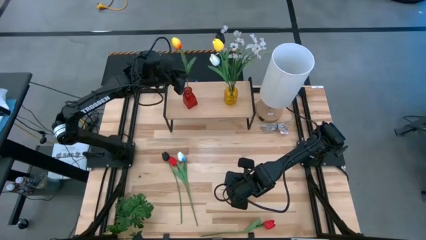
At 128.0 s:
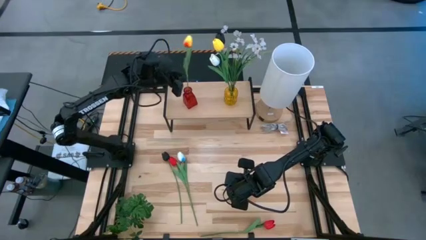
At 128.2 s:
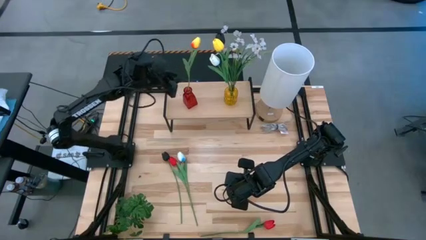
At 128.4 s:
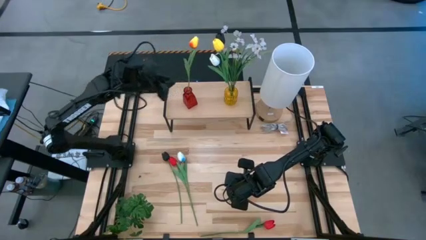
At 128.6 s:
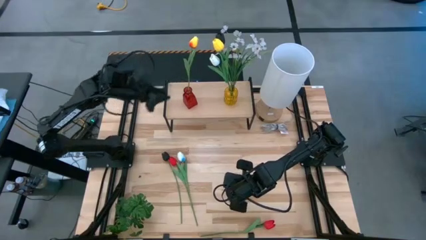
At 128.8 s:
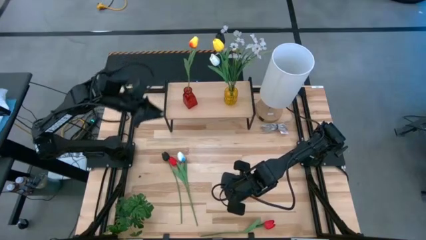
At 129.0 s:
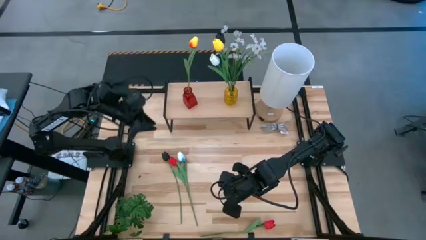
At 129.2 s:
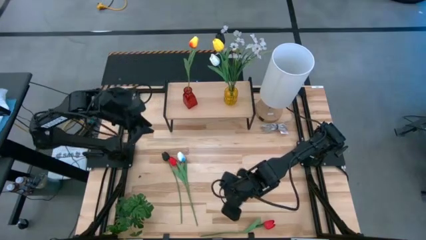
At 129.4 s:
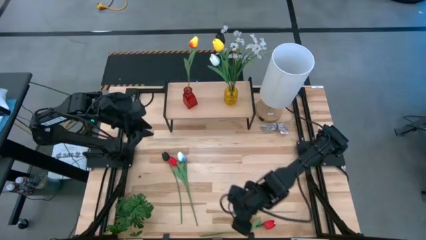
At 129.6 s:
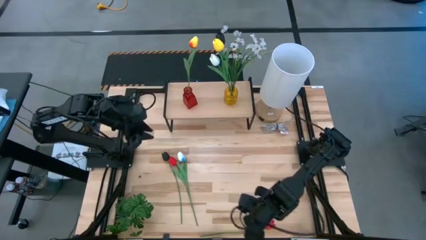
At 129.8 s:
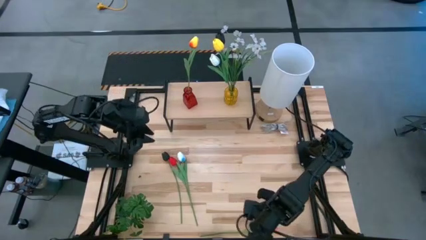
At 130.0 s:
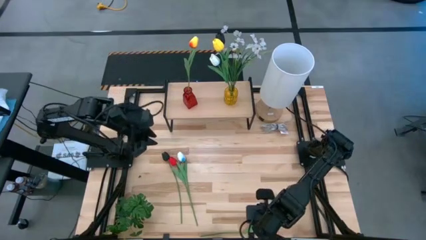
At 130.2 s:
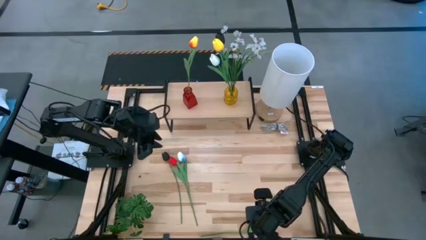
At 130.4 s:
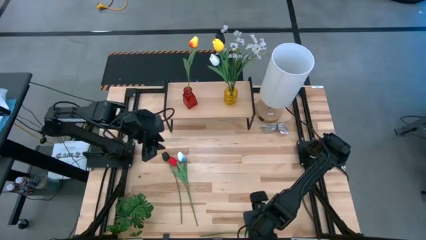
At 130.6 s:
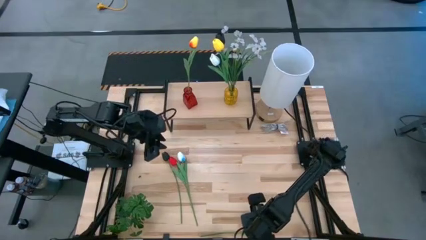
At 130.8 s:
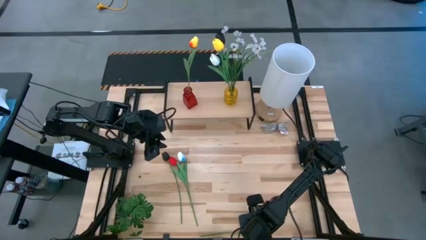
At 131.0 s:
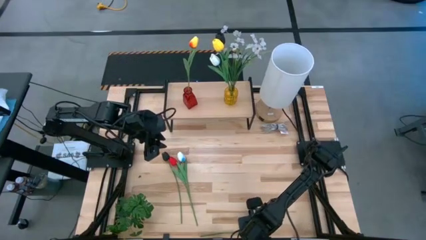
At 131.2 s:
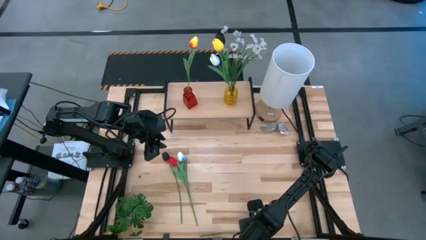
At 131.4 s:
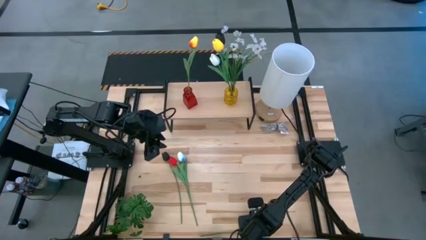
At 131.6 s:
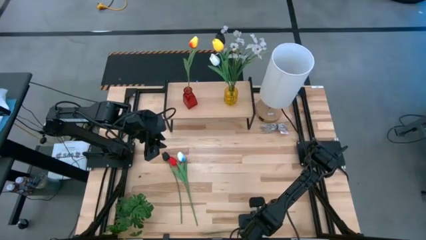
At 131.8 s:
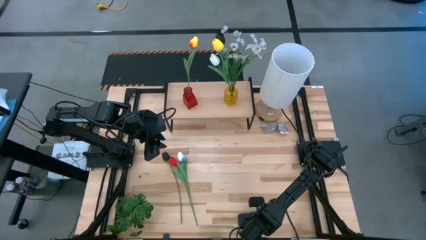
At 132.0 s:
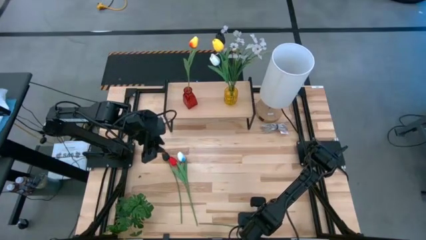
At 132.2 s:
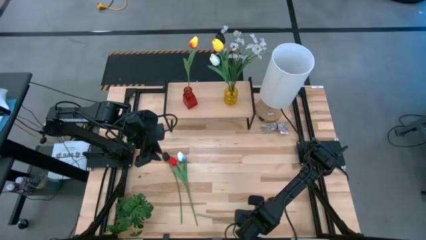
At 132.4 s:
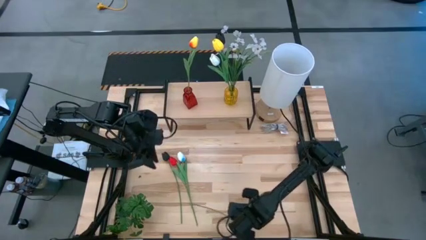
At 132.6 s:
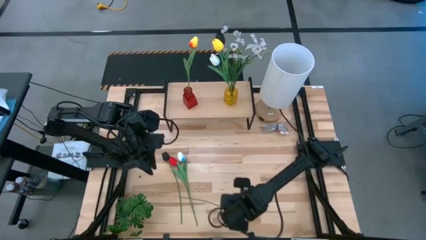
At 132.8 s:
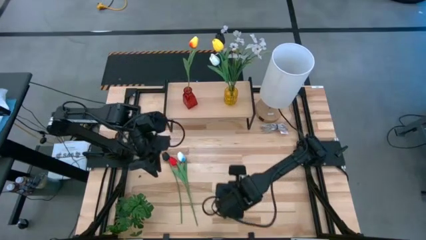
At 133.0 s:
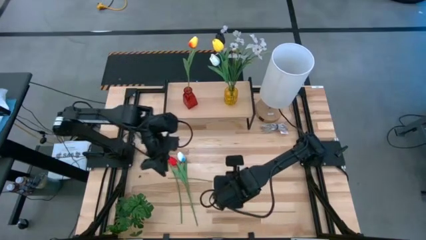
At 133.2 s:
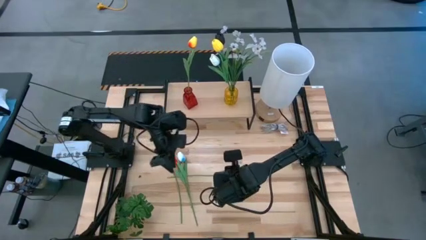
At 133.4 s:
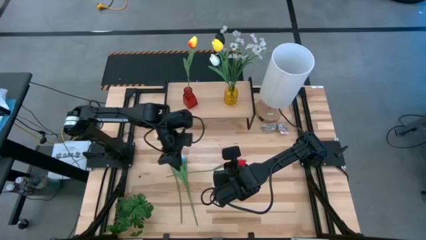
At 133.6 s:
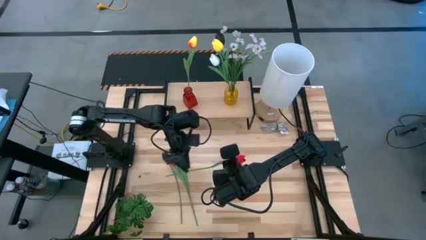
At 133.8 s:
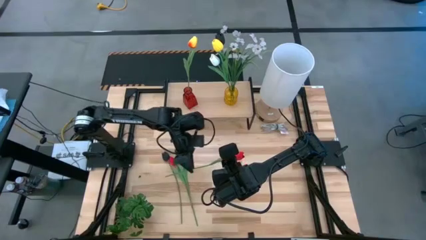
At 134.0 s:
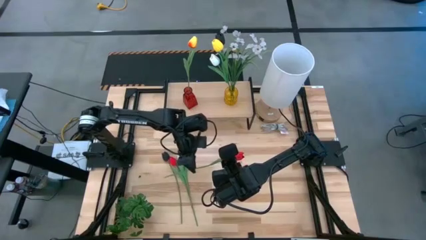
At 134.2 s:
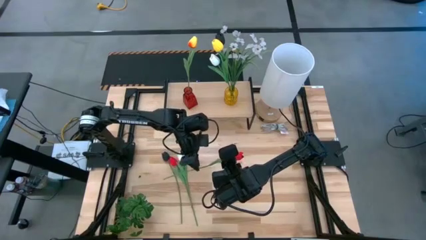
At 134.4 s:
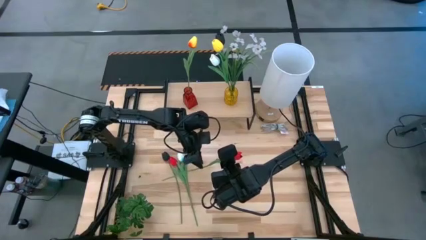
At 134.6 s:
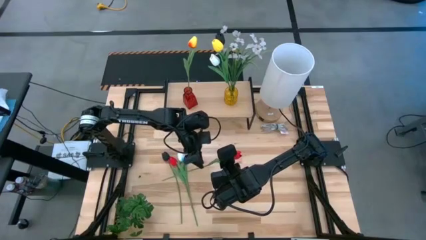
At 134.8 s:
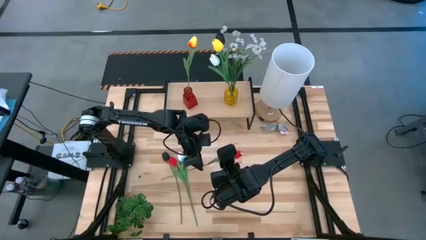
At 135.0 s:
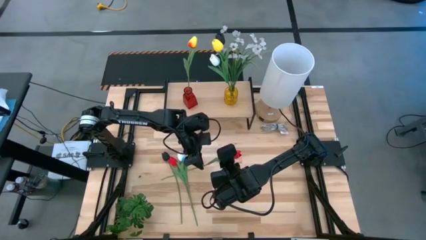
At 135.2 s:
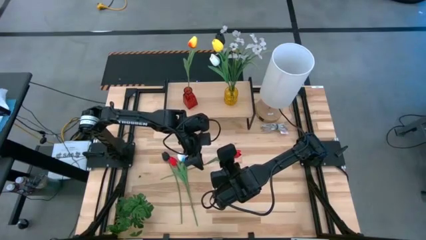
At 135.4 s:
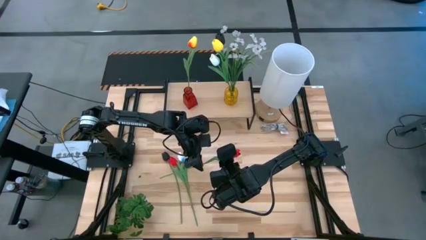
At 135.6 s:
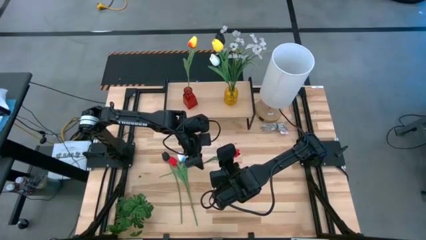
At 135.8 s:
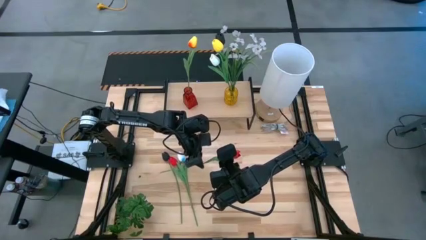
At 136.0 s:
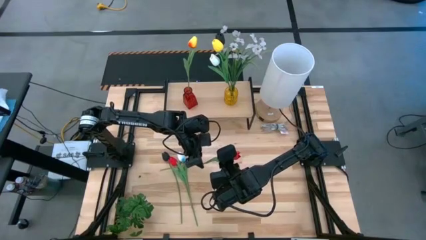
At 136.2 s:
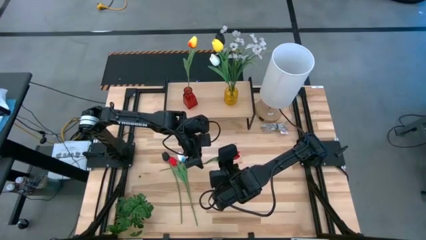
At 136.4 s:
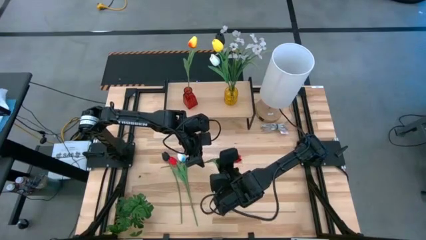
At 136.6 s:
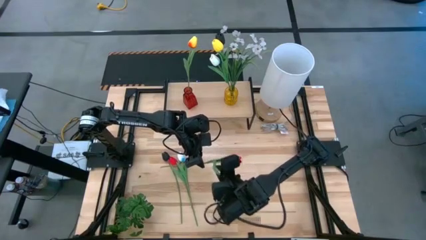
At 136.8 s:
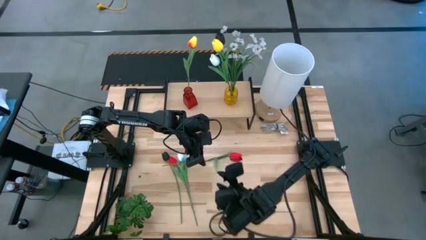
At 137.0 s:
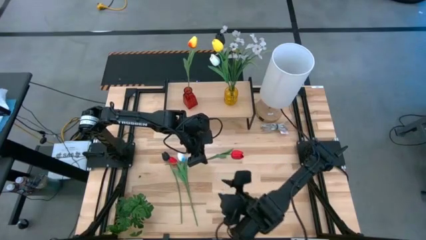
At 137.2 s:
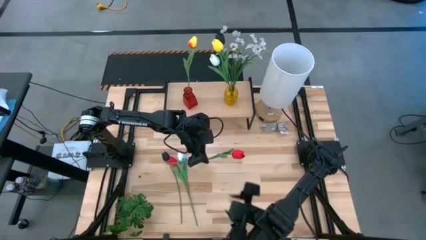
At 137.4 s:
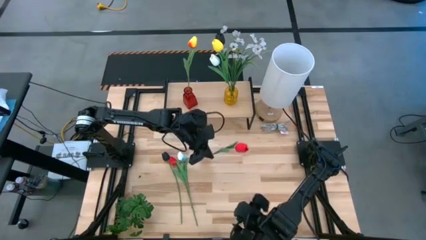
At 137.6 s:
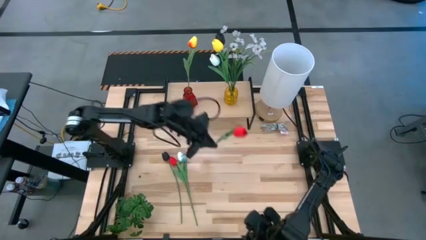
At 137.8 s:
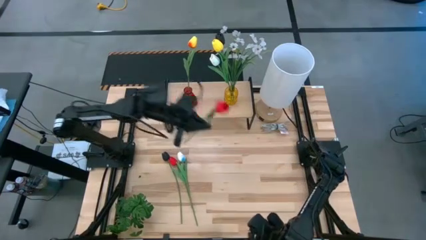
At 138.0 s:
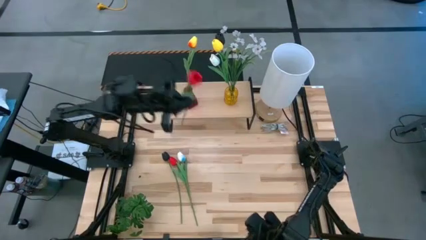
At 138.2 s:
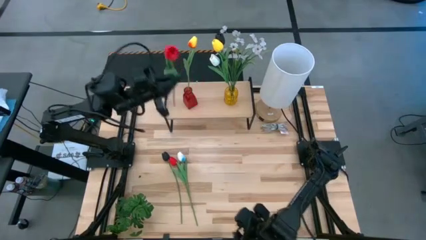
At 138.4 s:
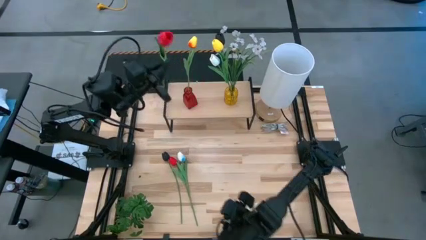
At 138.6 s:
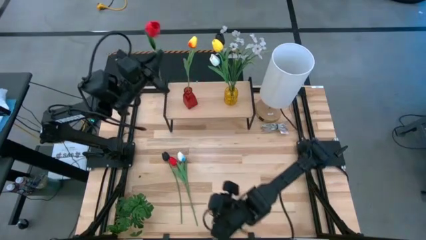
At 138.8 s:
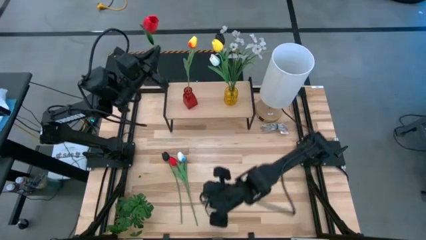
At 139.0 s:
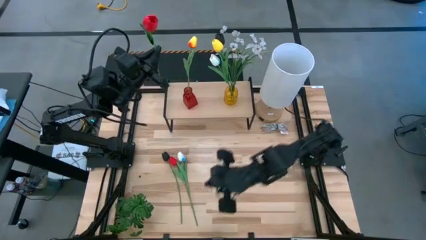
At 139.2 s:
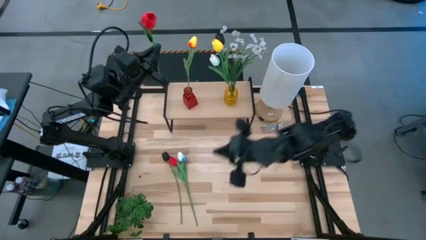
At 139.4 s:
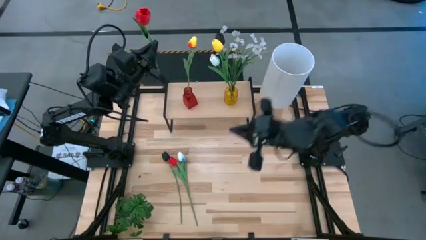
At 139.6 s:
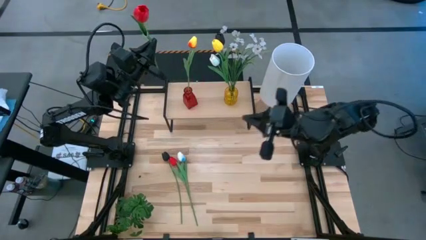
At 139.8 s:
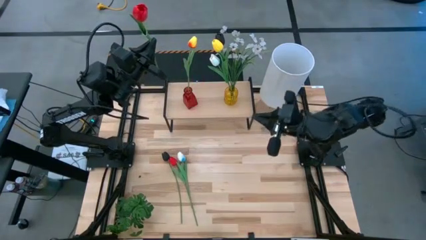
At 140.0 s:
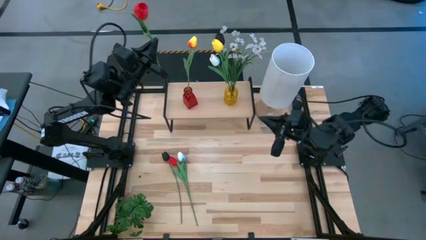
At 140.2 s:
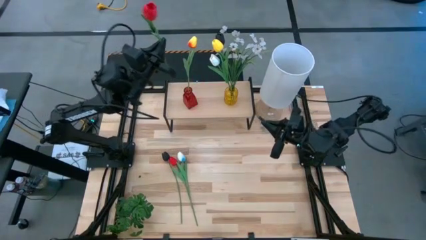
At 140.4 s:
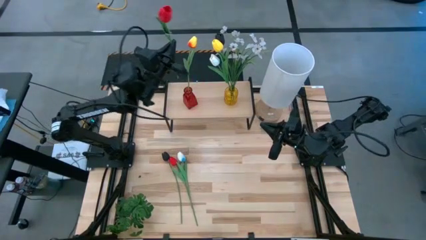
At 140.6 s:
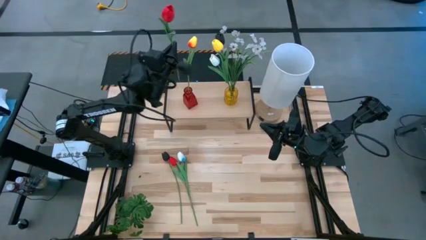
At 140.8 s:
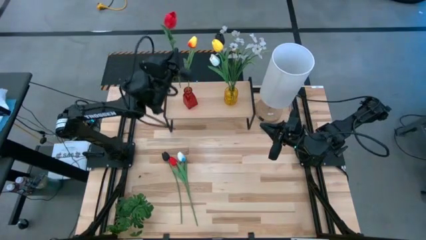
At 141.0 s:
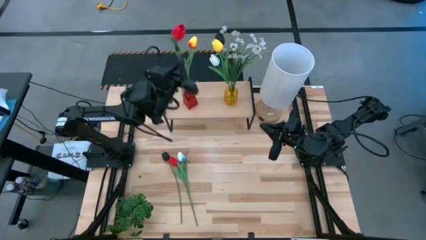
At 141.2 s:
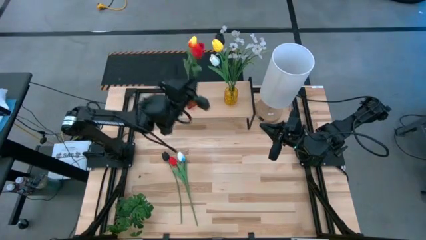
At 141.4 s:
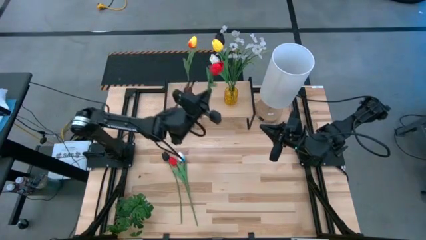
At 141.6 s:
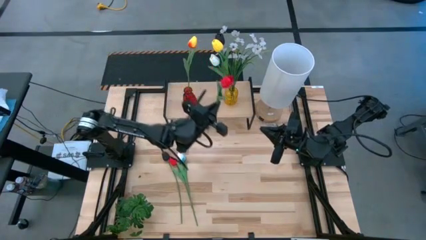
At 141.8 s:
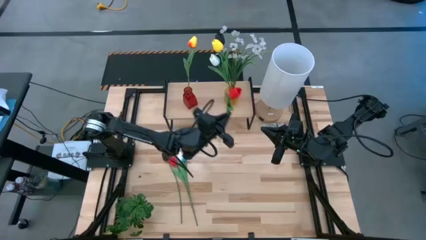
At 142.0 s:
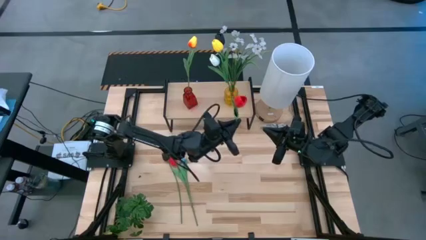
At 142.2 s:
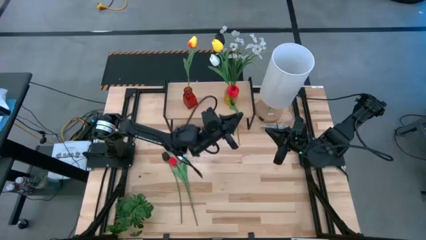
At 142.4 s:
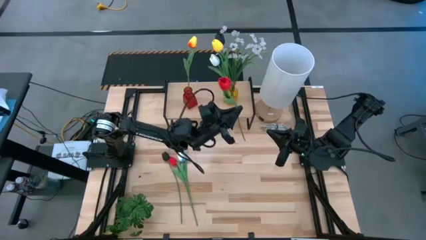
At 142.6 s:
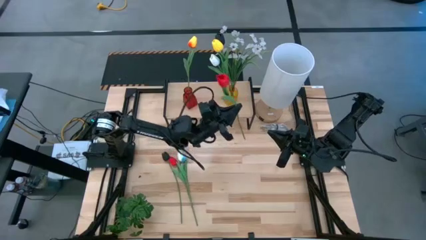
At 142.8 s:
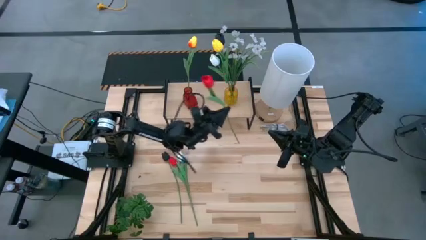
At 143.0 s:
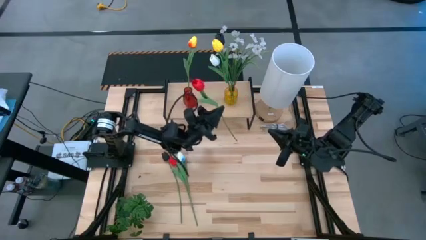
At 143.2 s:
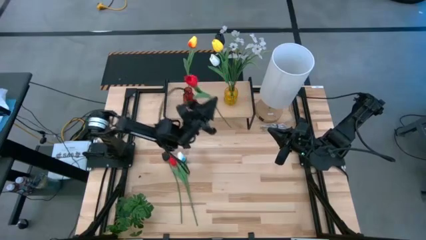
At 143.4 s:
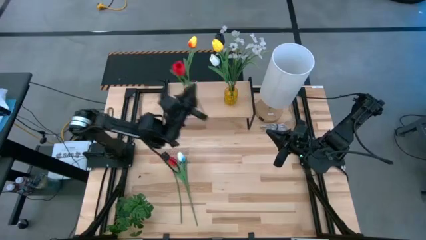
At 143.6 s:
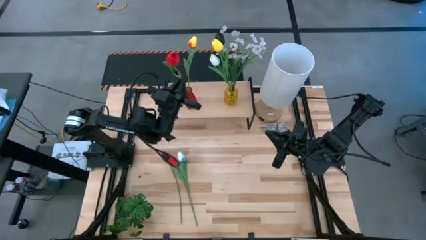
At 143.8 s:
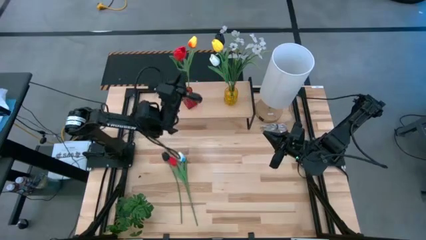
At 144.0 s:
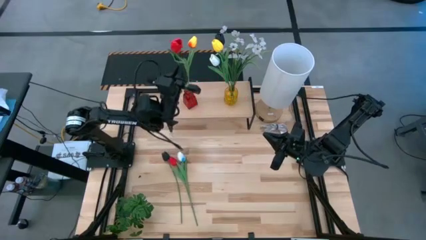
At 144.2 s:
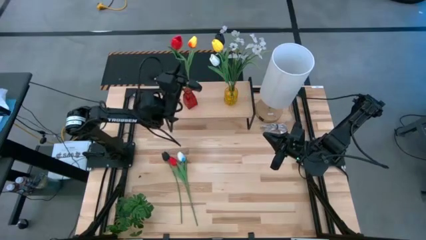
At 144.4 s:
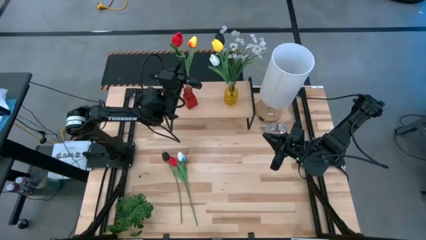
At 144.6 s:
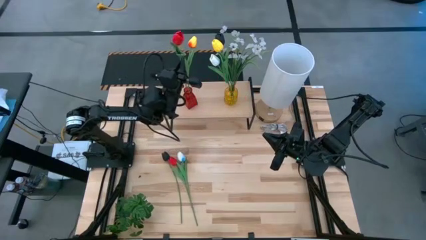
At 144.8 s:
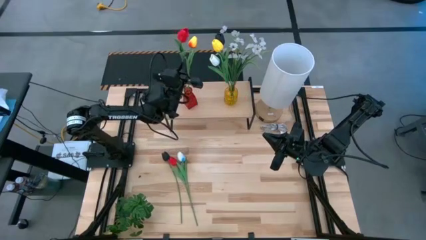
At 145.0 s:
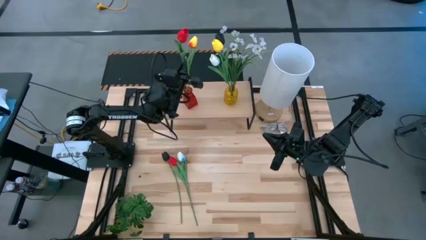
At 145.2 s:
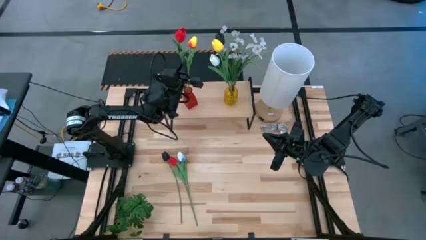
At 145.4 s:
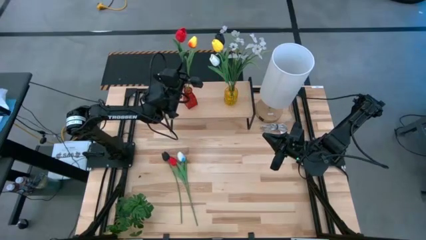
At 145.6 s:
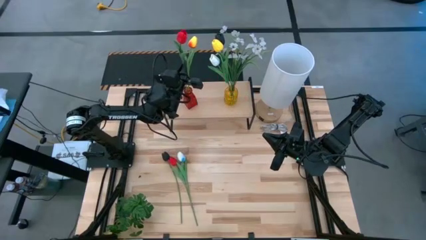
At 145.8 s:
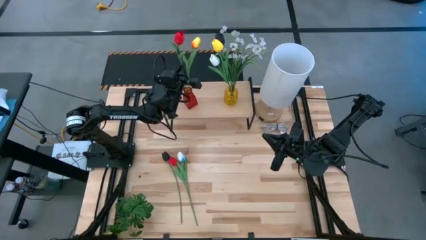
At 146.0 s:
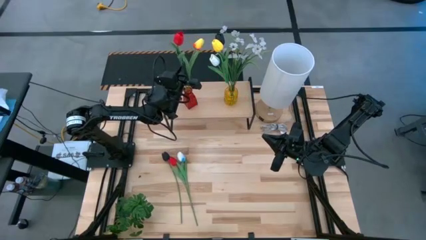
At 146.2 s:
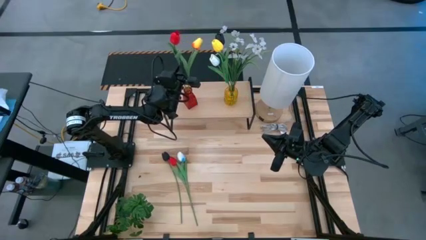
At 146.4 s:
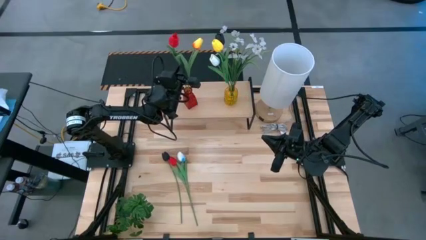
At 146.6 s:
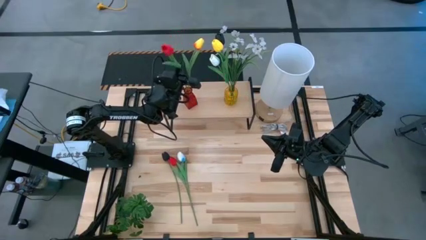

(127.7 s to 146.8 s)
Task: Pick and place flowers into a vace then onto a shelf
Put the bottom red tulip into the red flower vase
